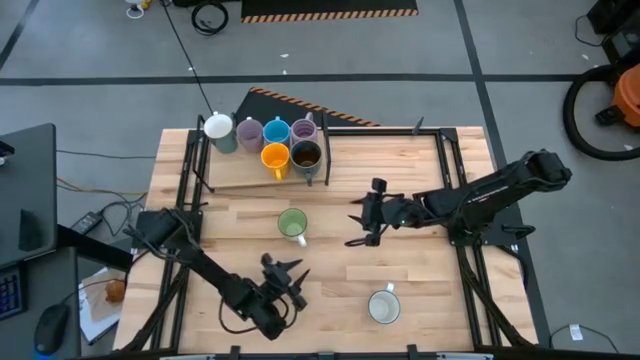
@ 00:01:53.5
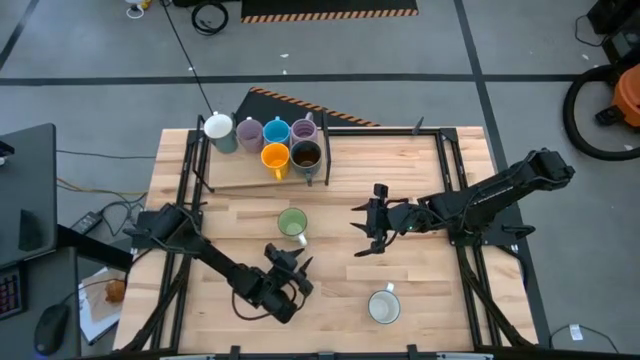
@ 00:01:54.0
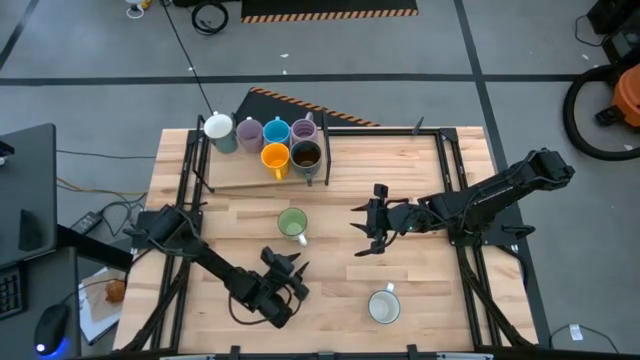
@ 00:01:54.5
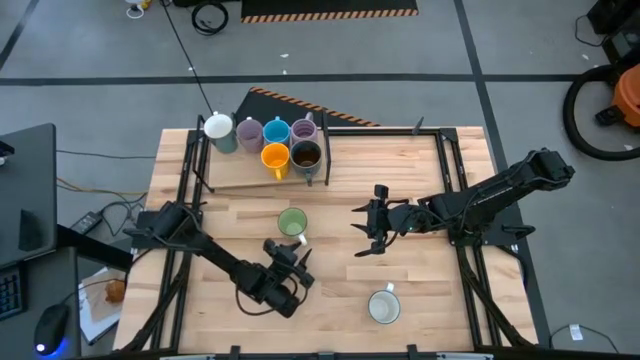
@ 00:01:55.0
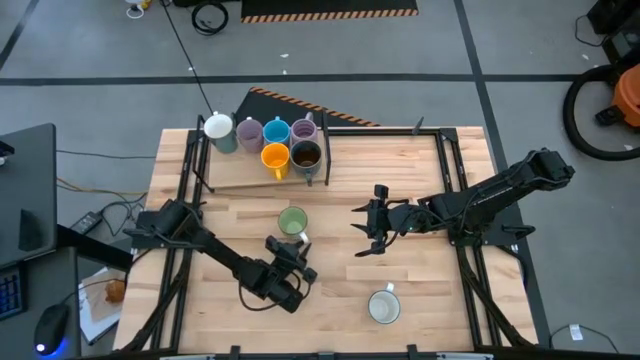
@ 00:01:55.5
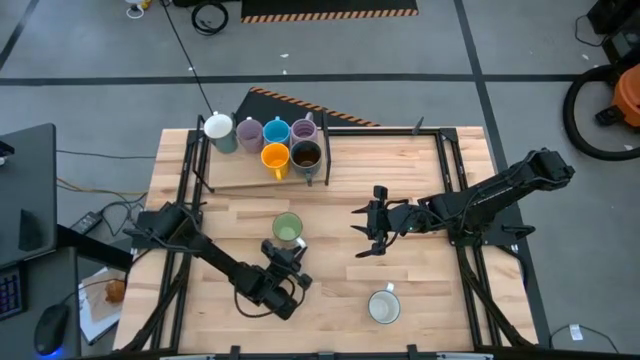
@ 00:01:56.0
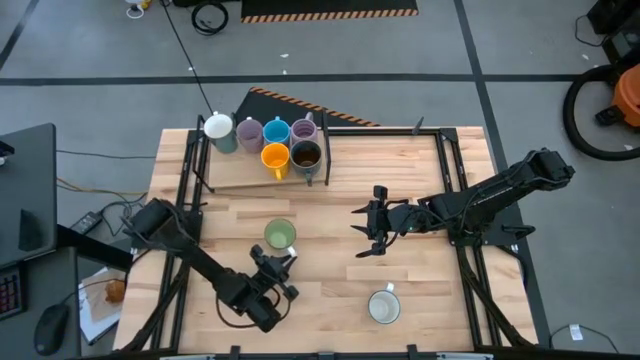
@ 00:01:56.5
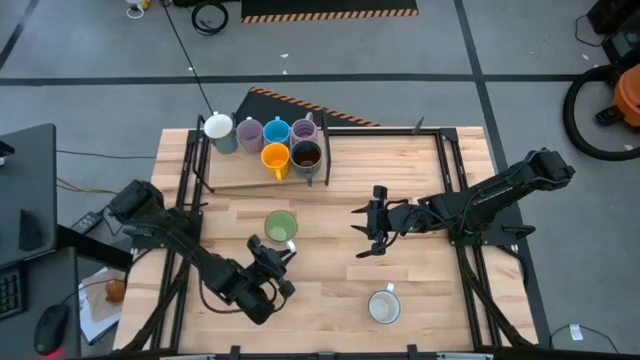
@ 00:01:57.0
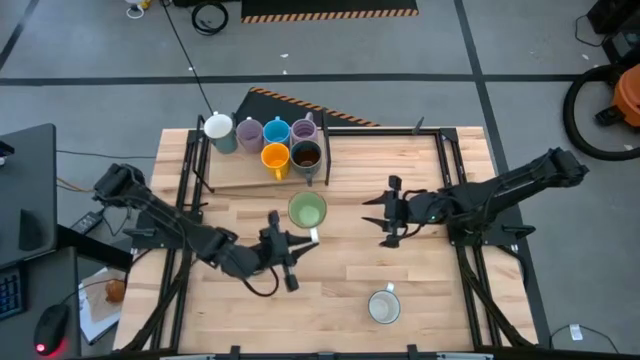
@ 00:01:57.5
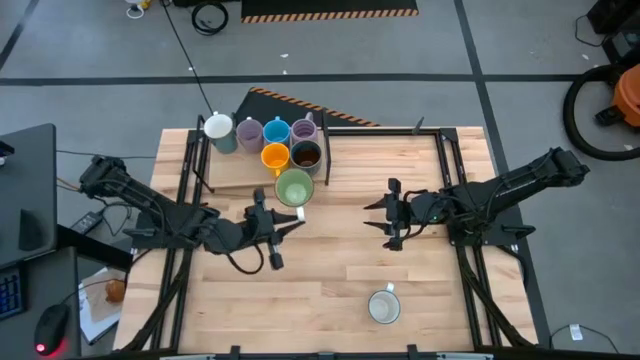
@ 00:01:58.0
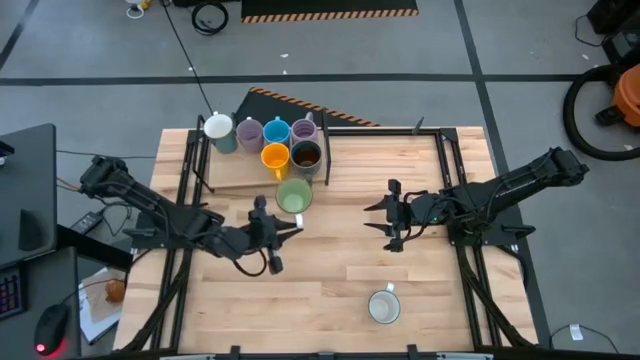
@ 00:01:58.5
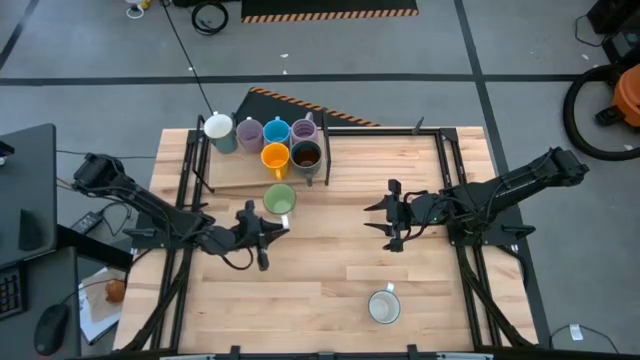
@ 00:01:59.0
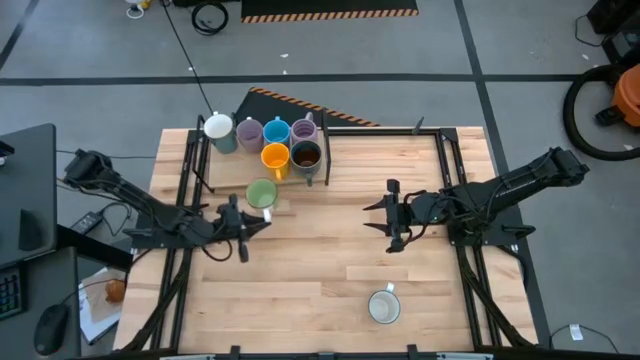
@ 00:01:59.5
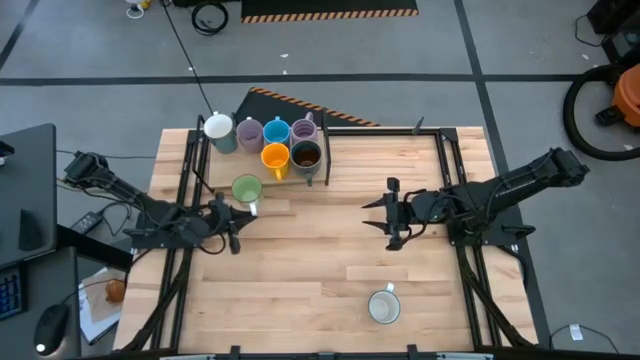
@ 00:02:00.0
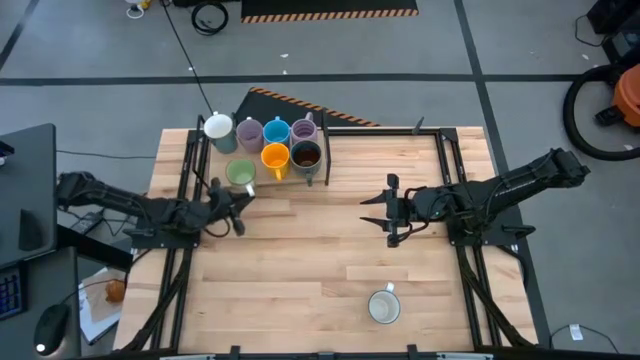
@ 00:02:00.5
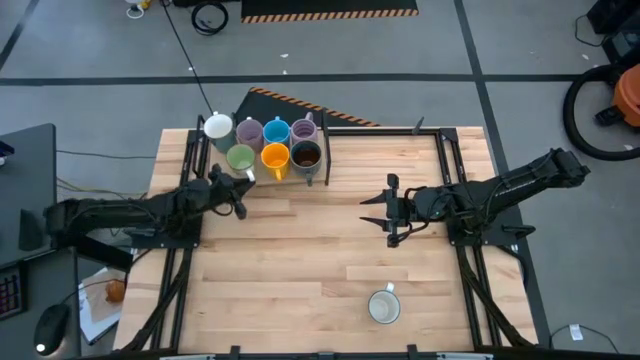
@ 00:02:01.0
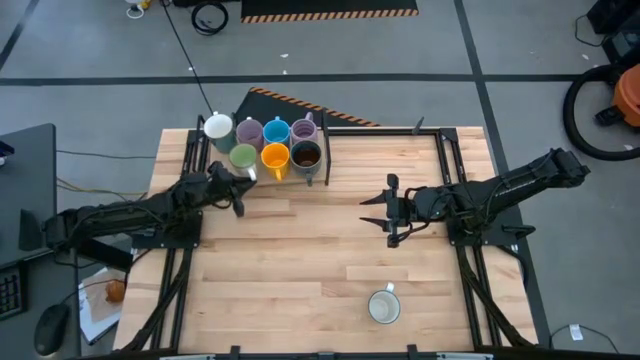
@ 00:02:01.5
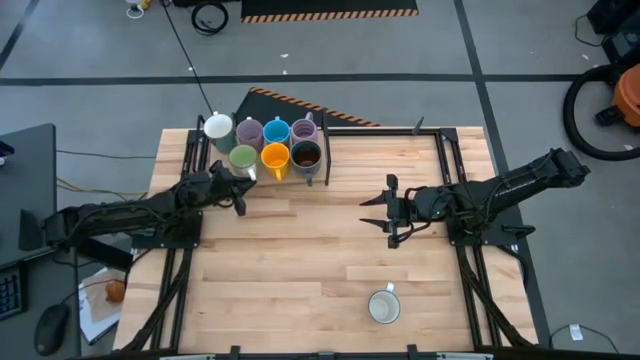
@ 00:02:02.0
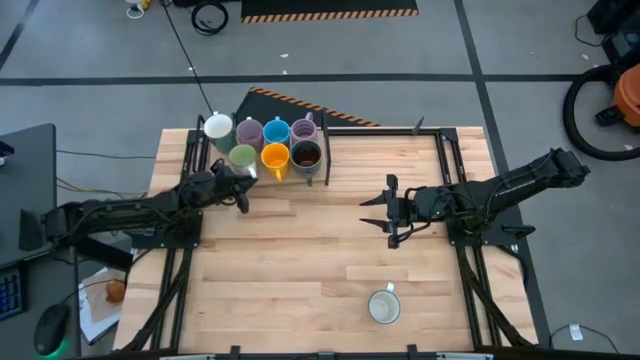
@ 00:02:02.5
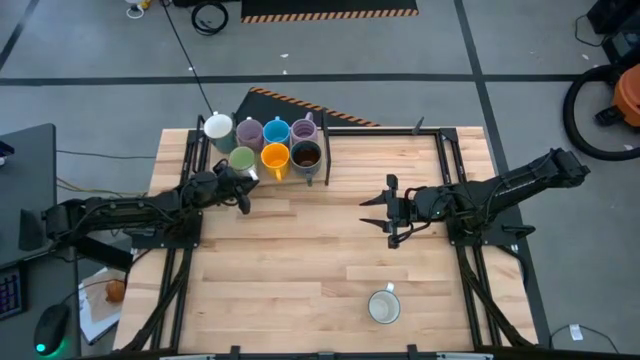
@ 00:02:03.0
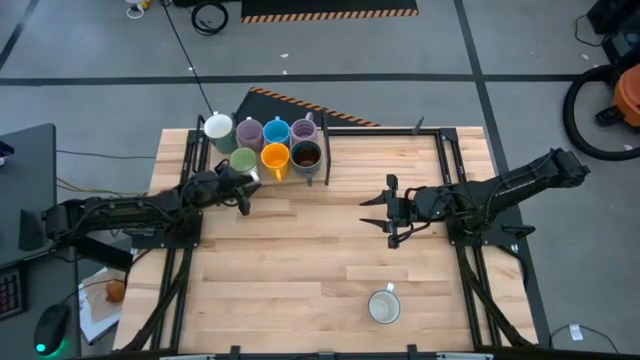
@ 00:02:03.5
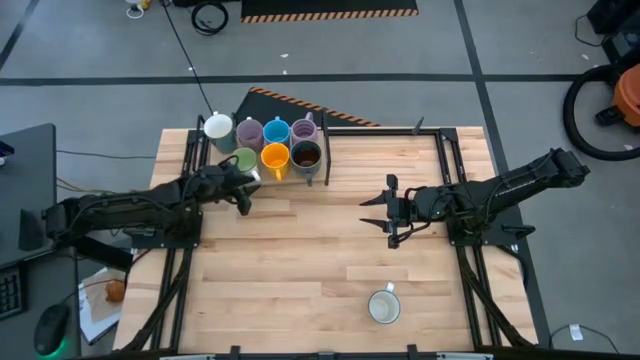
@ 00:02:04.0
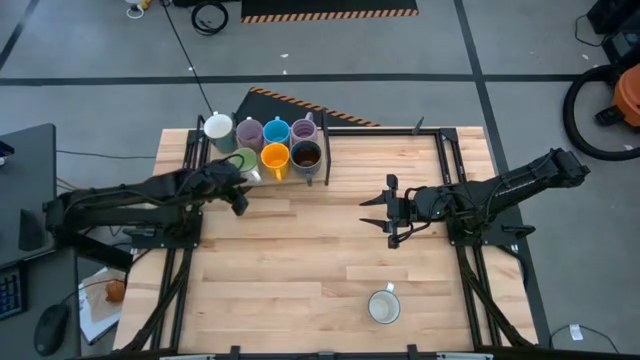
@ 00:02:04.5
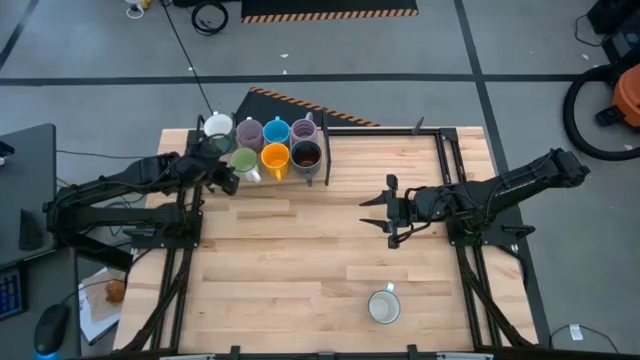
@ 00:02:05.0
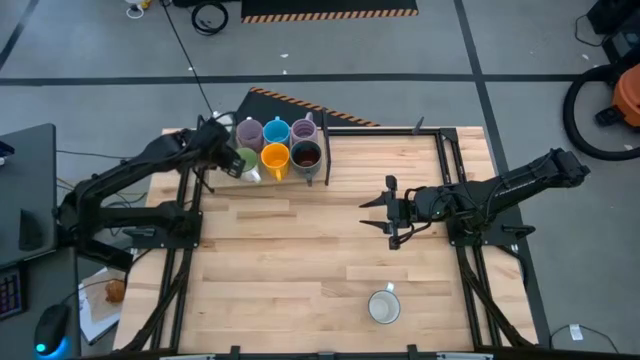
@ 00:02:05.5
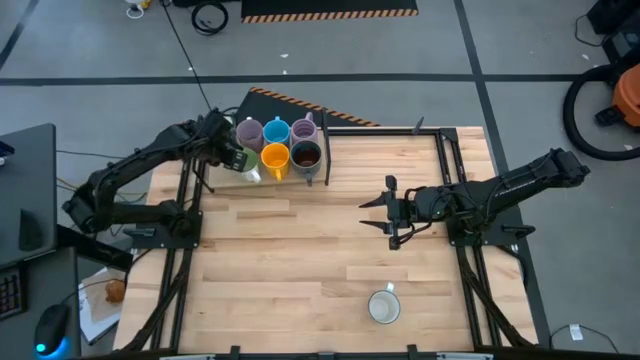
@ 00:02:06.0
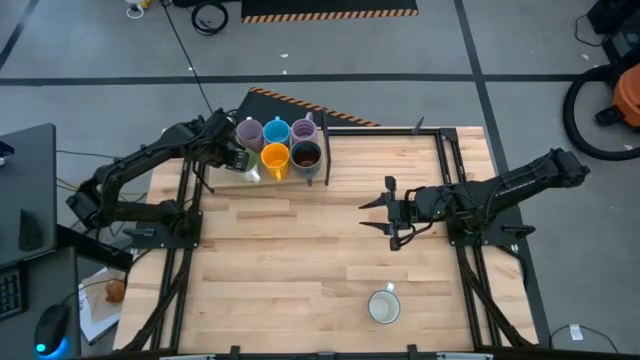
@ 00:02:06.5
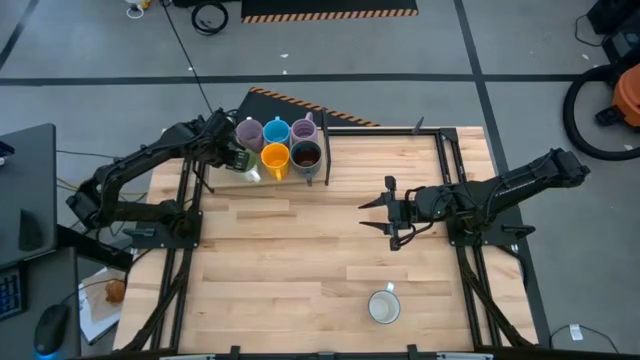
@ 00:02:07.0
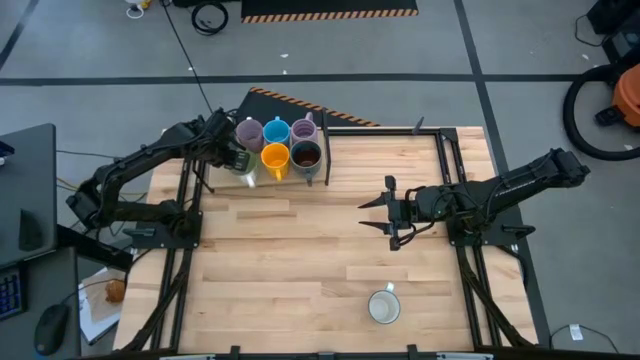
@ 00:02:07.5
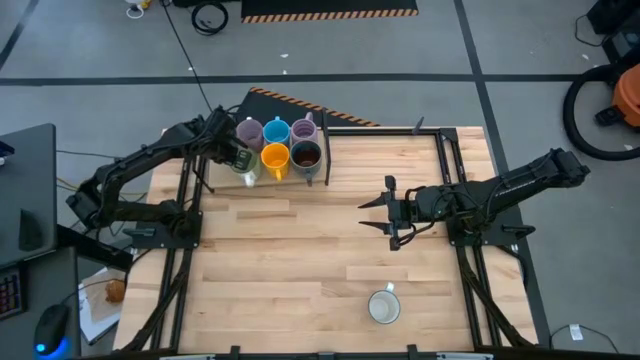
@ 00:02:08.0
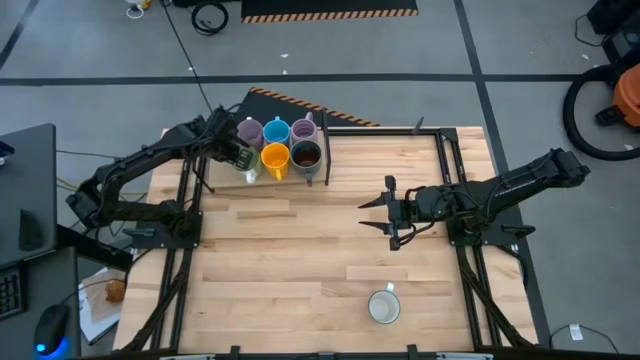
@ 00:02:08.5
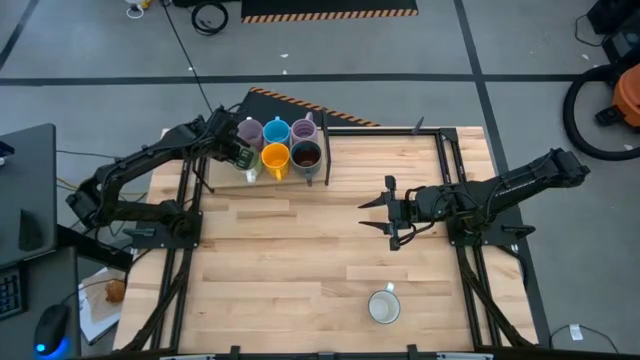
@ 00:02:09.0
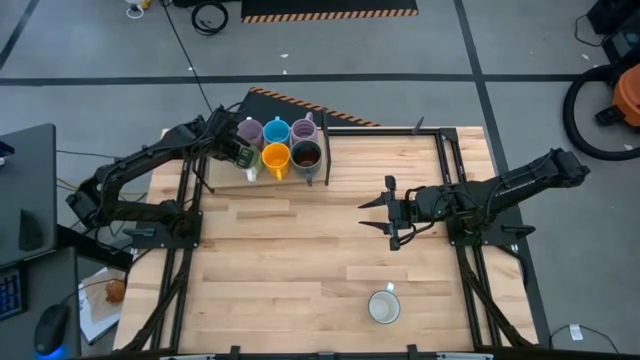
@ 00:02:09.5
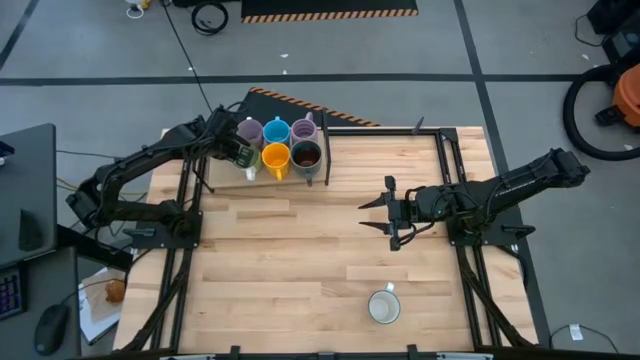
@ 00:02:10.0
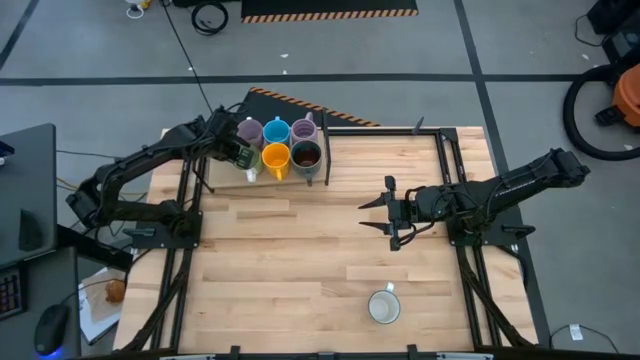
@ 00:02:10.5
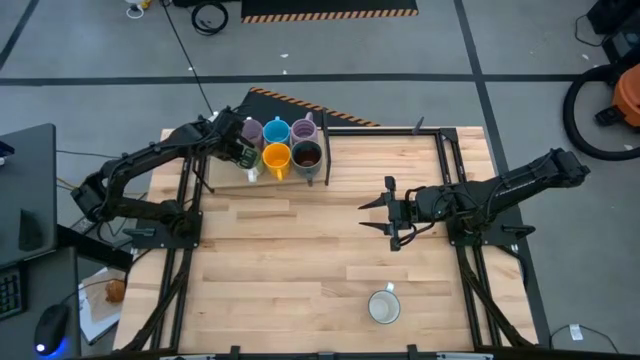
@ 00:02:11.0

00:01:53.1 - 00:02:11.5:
Task: Place coffee mugs
Put the green mug on the shelf
